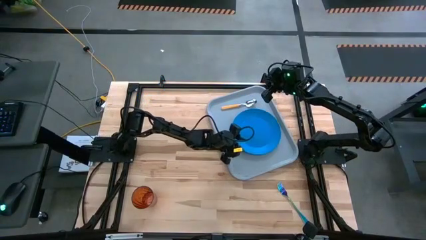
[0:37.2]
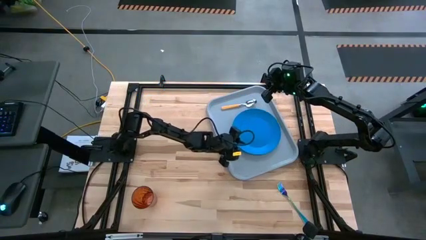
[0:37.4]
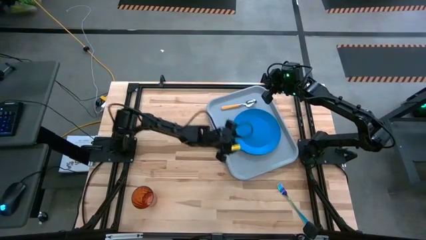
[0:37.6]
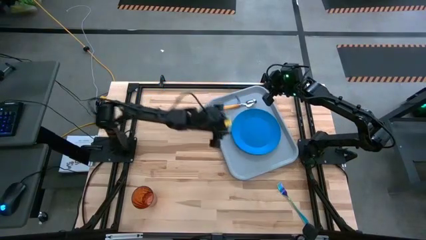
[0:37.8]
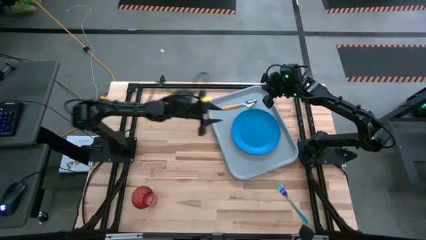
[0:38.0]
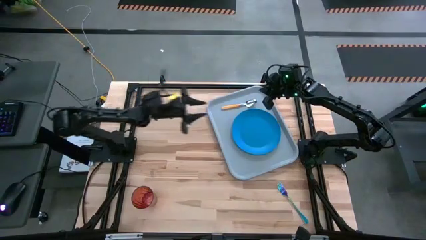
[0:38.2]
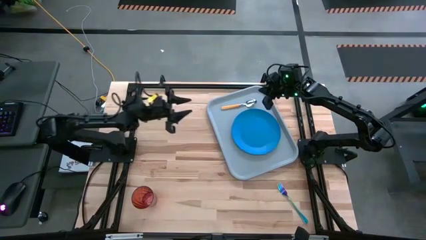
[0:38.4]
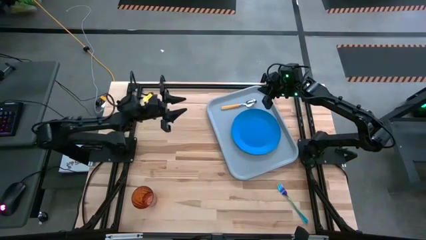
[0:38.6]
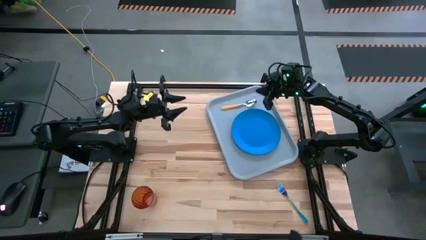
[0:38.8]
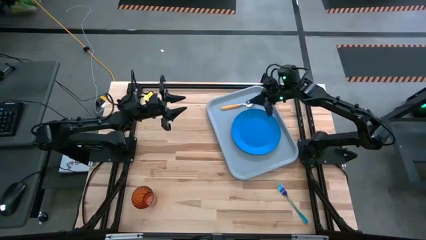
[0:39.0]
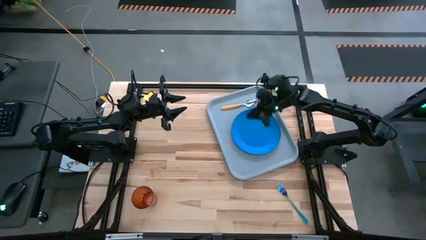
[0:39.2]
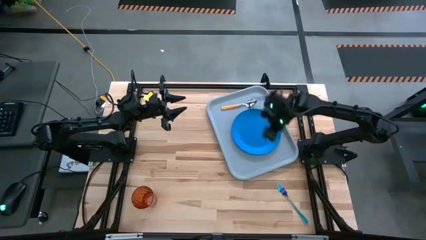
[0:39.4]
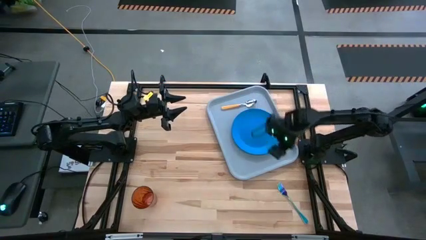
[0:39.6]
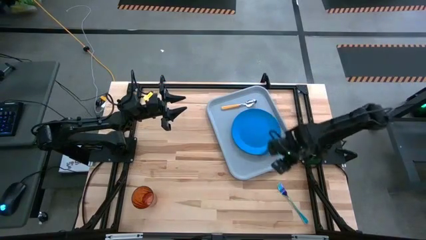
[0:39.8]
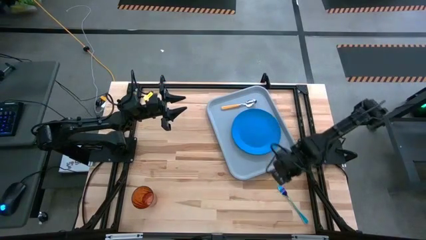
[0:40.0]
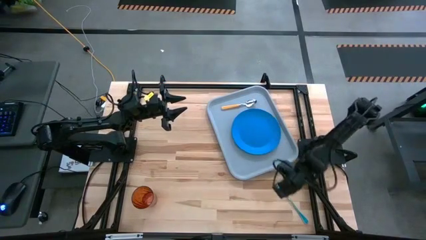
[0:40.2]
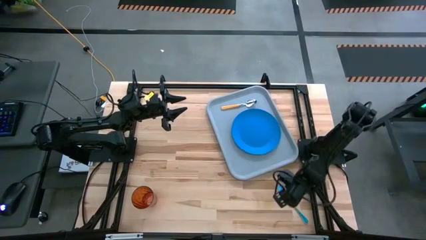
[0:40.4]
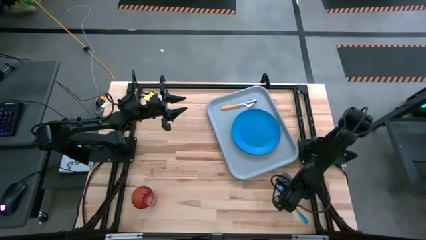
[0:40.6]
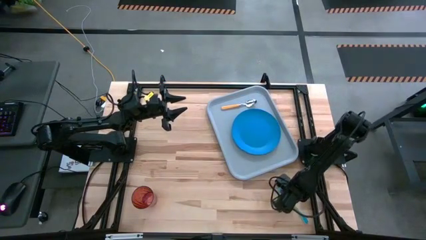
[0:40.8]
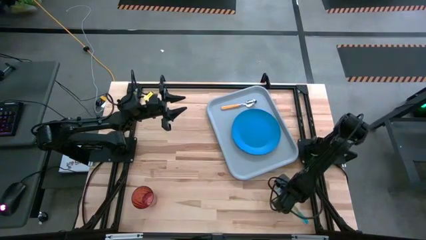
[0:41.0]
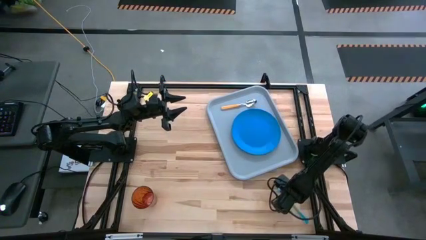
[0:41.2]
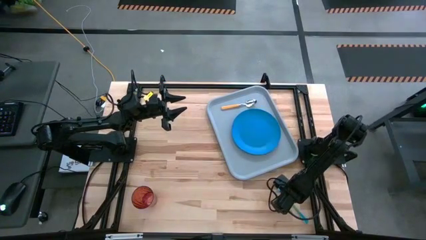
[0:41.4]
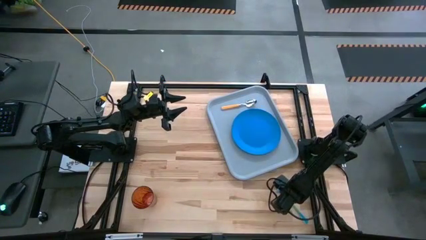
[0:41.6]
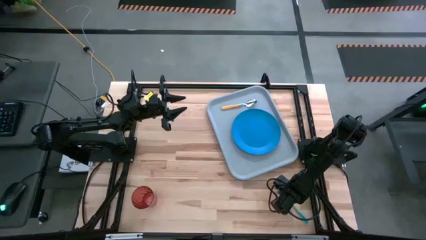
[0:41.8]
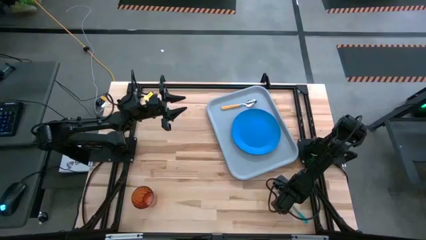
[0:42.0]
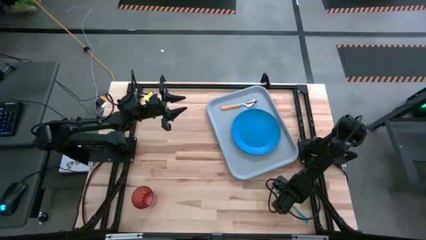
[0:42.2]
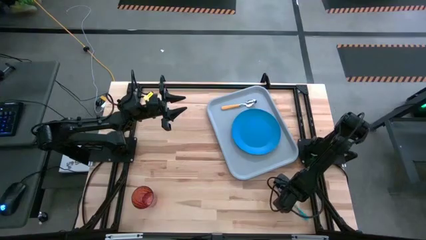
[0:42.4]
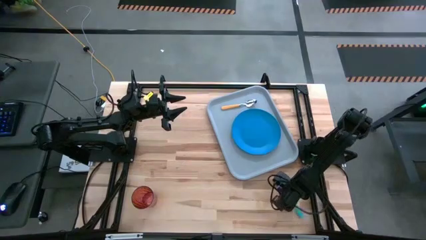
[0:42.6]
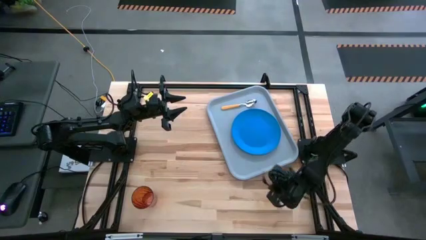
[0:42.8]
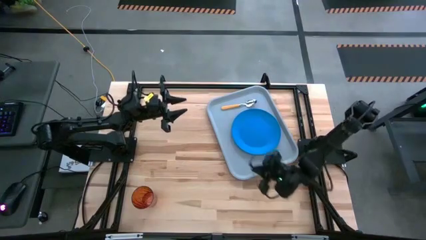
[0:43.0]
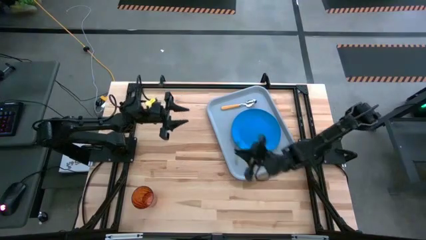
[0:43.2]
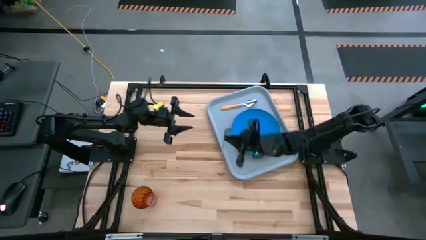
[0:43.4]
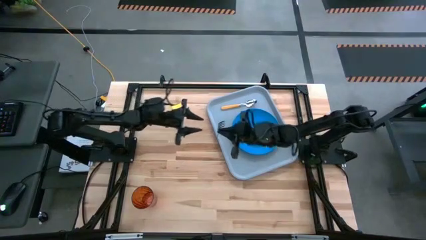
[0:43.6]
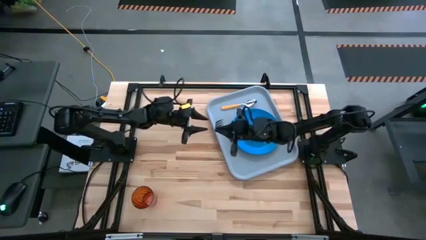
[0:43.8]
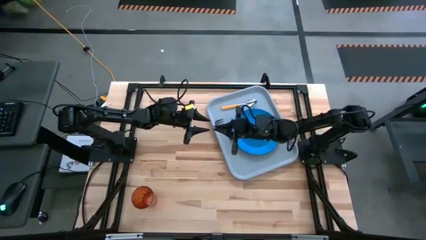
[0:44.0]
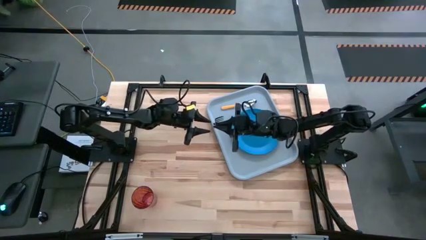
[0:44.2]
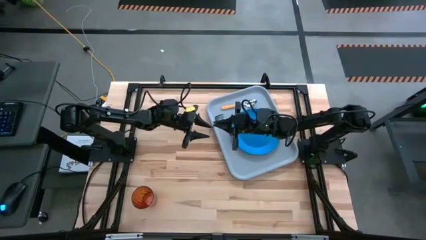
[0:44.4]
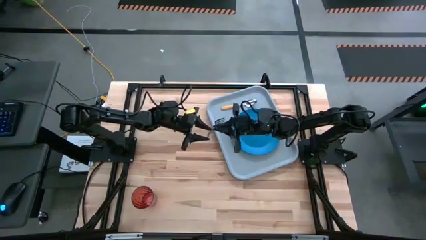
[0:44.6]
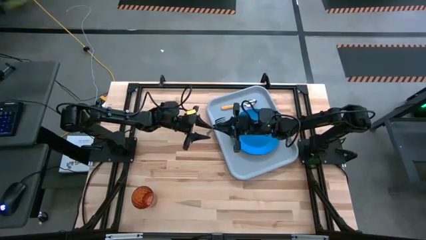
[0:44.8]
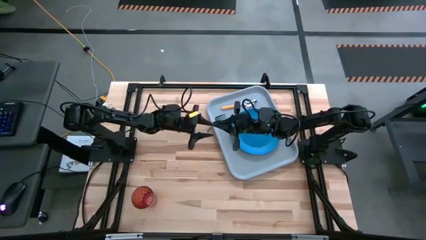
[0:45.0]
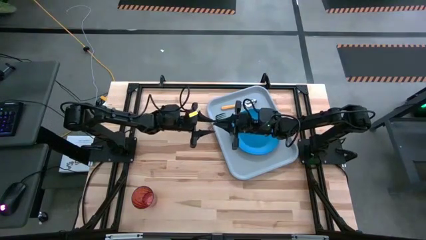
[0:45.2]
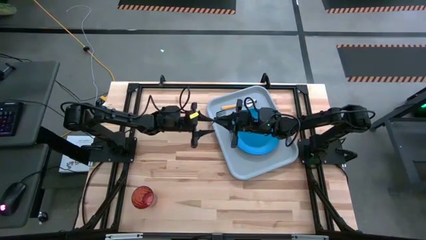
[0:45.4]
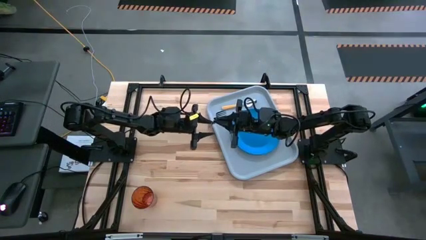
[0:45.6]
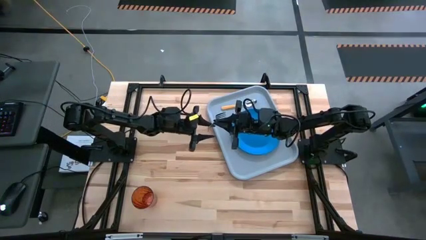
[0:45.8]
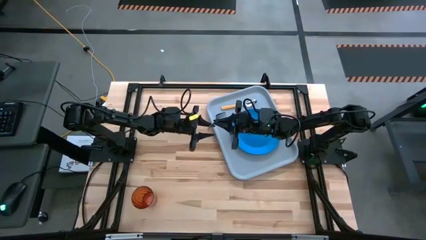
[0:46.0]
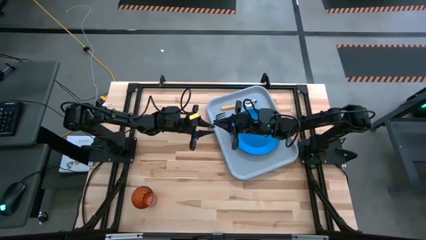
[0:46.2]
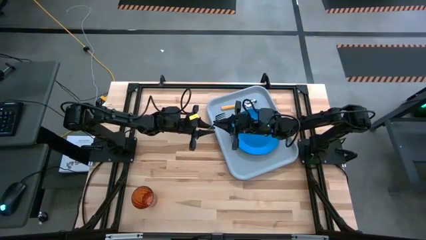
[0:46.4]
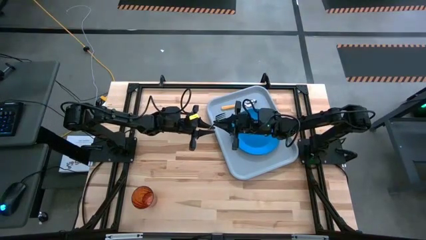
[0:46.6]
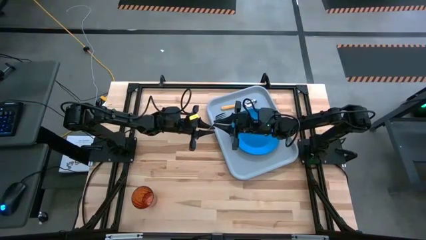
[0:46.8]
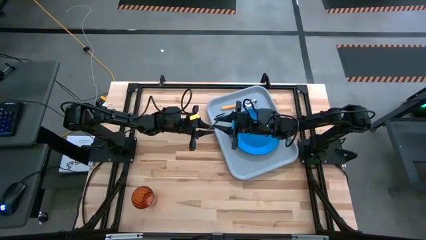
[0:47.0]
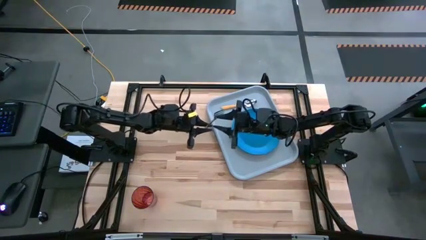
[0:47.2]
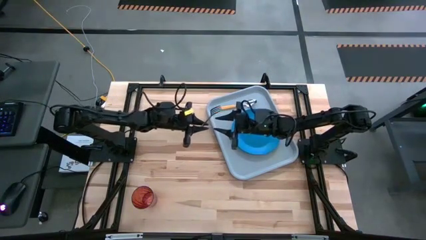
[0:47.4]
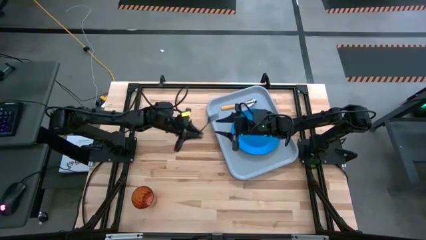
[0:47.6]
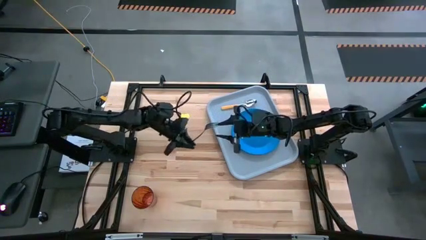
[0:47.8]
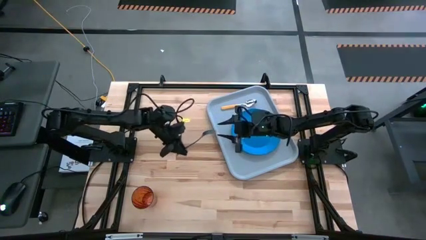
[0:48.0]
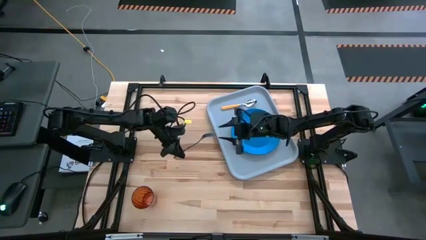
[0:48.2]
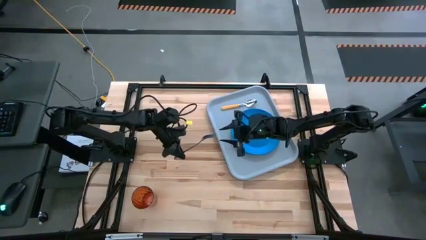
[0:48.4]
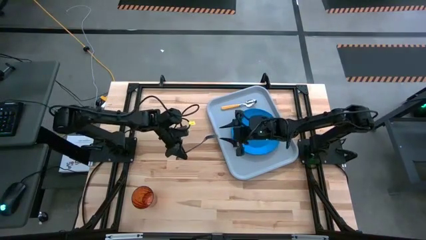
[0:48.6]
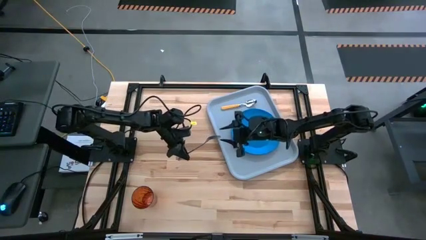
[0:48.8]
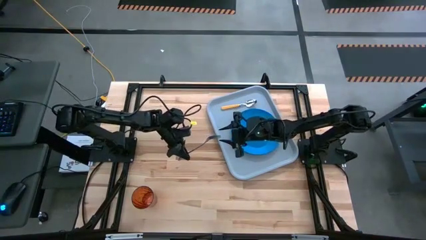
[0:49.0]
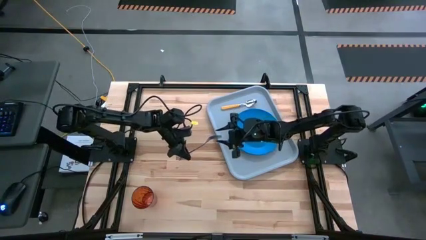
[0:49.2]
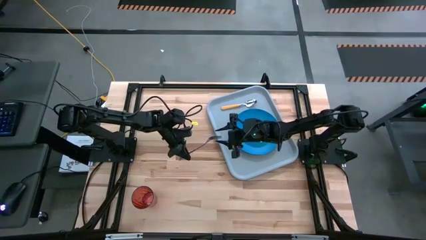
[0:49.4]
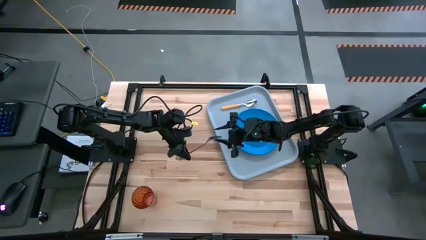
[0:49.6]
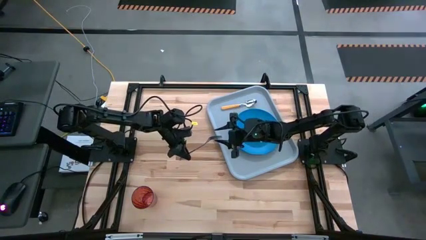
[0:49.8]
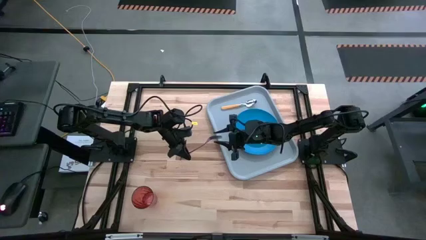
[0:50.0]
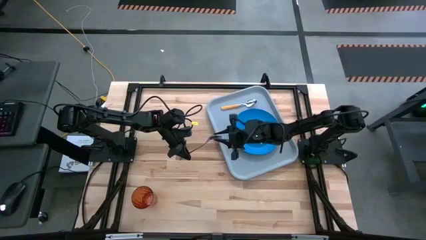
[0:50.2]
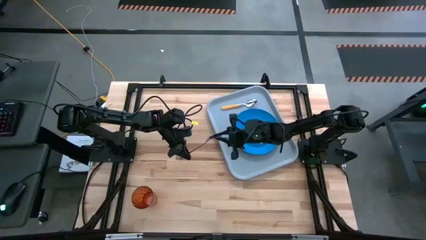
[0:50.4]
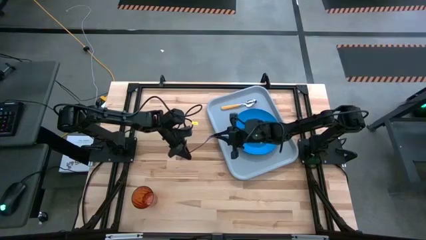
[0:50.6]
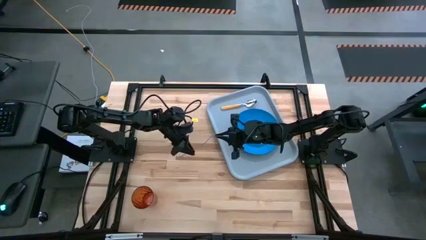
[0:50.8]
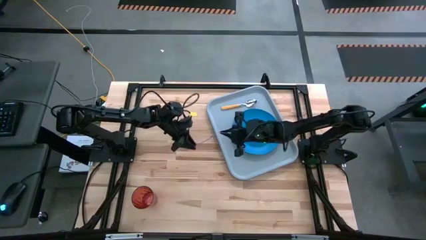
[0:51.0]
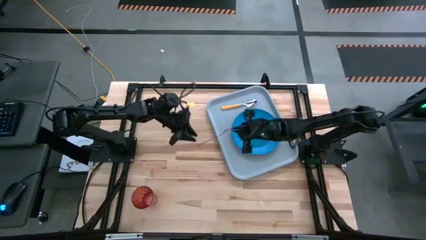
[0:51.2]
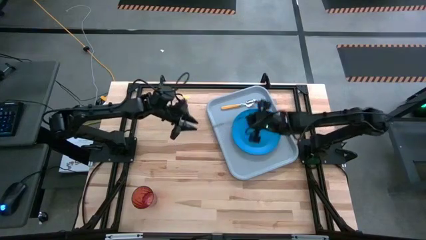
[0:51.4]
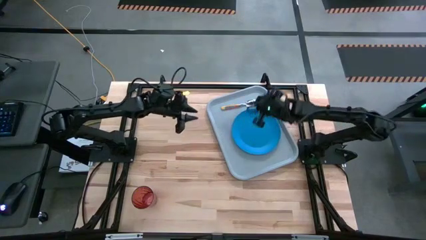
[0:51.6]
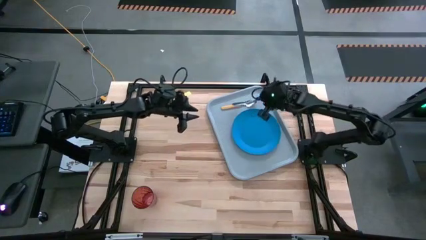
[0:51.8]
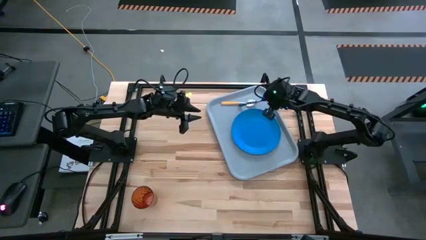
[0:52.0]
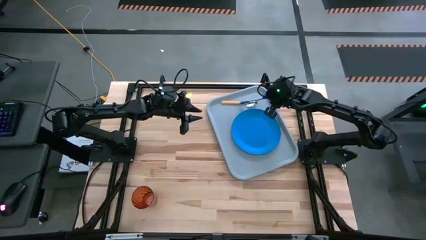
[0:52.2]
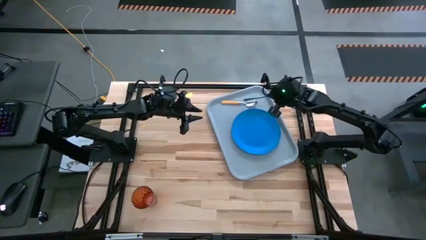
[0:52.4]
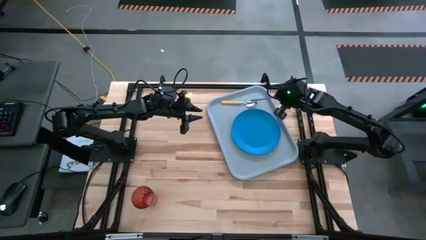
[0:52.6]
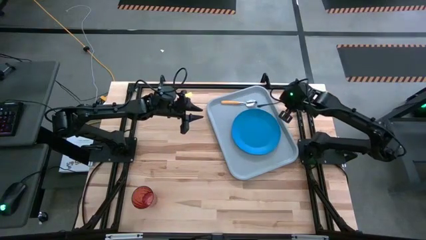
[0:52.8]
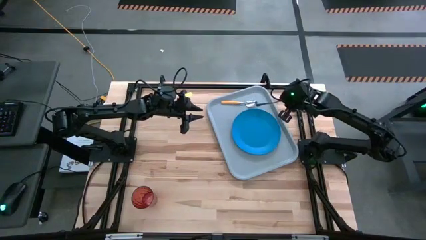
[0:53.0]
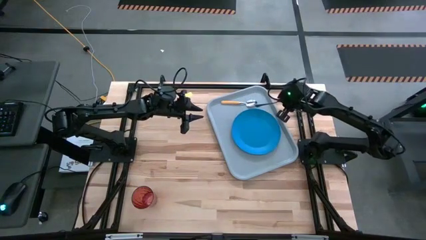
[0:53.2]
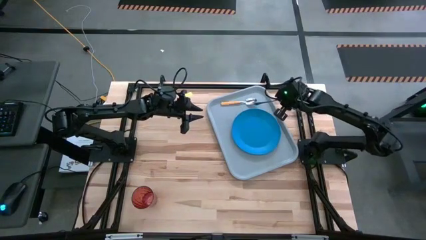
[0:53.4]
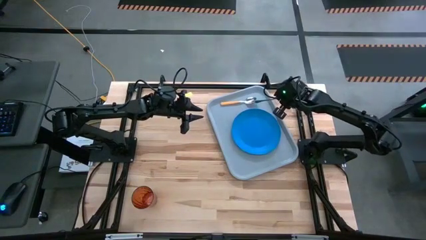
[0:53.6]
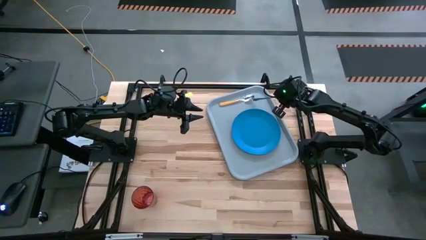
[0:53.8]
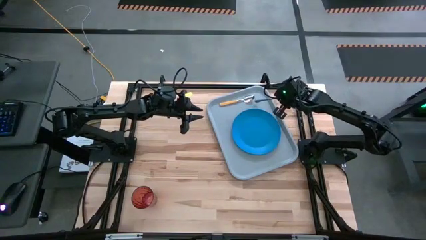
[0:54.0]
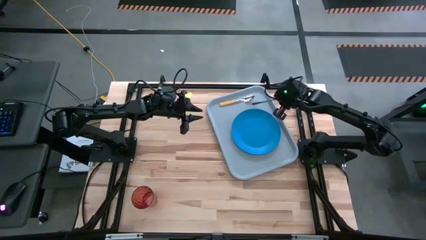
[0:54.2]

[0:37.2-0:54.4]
Task: Pick and place plate/cup/fork/spoon on tray
Put the blue fork on the gray serving tray to the right of the yellow spoon
